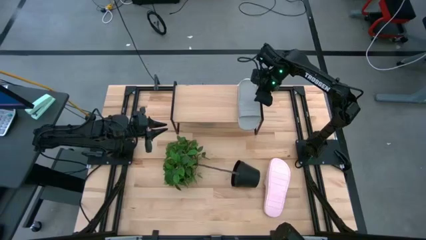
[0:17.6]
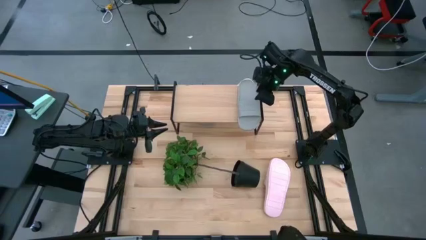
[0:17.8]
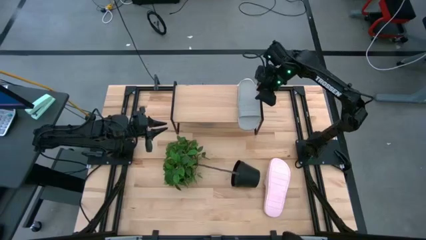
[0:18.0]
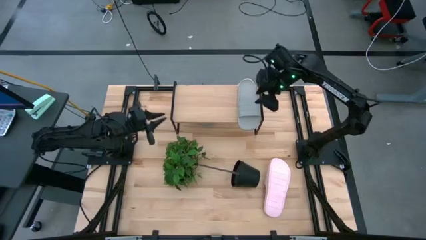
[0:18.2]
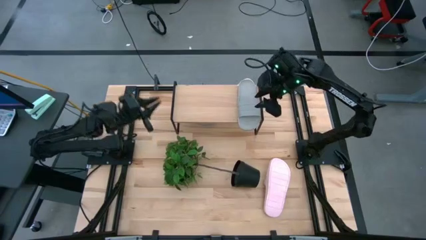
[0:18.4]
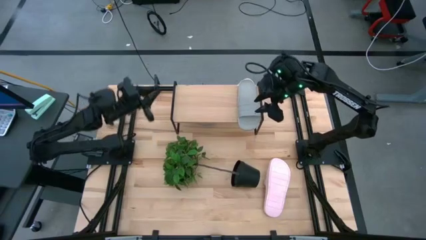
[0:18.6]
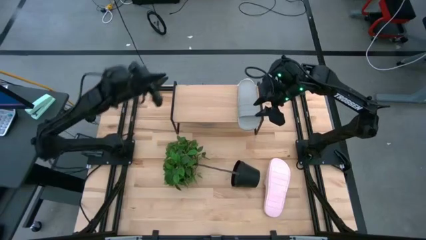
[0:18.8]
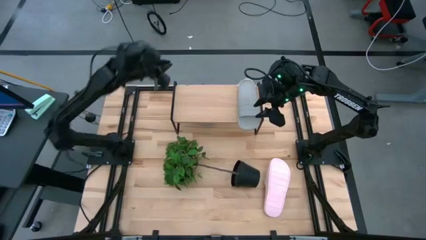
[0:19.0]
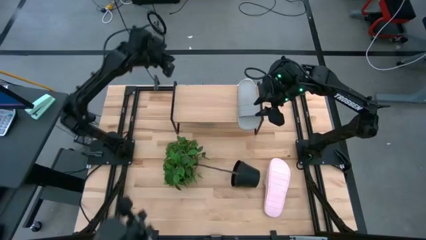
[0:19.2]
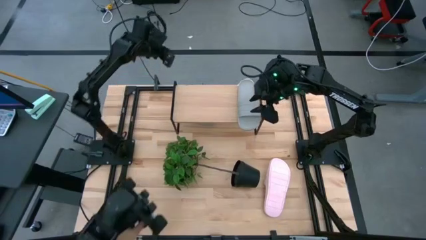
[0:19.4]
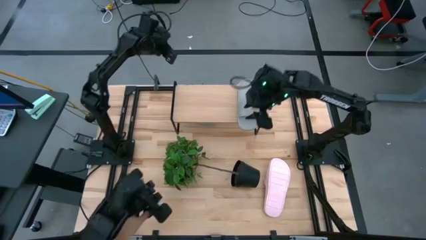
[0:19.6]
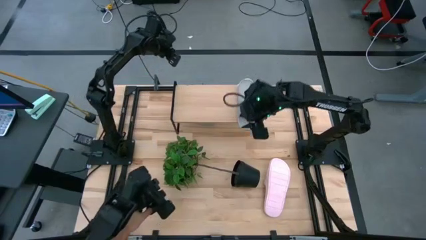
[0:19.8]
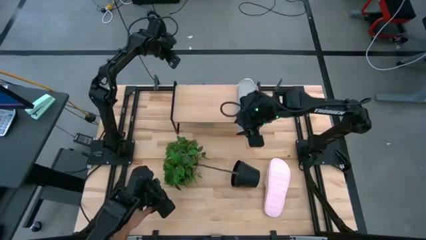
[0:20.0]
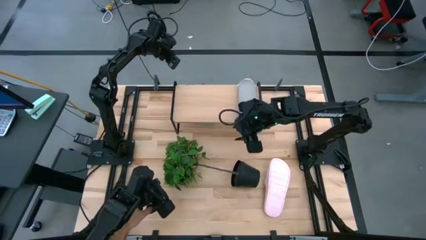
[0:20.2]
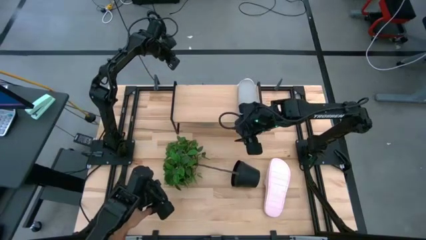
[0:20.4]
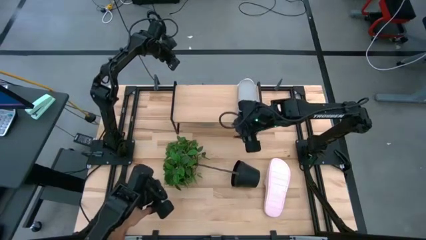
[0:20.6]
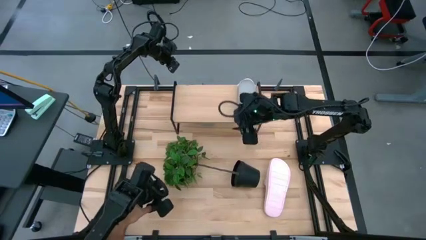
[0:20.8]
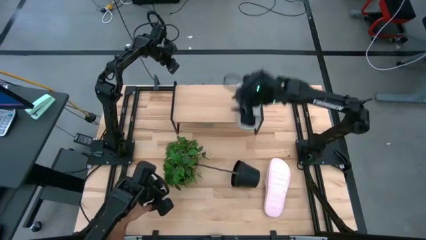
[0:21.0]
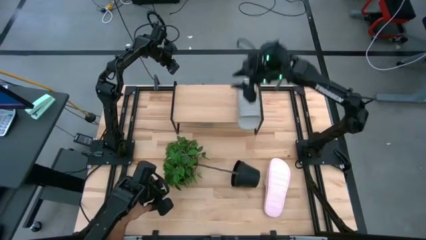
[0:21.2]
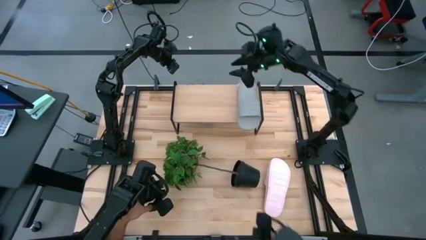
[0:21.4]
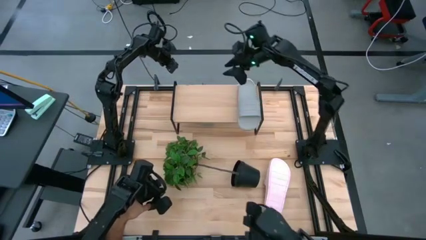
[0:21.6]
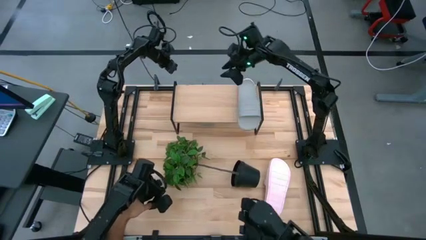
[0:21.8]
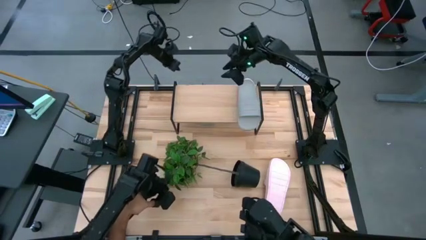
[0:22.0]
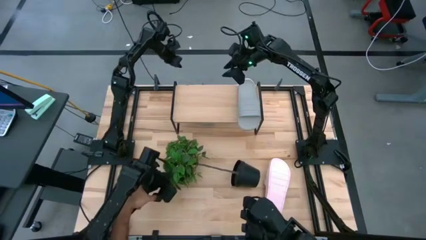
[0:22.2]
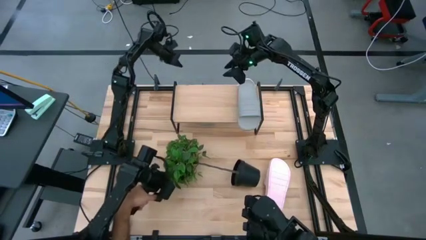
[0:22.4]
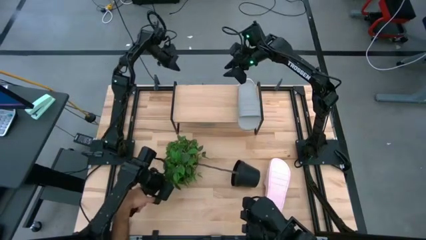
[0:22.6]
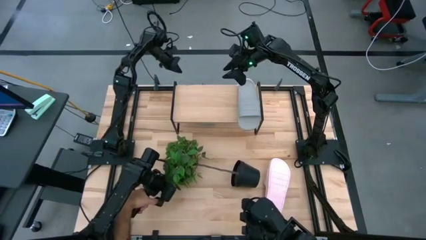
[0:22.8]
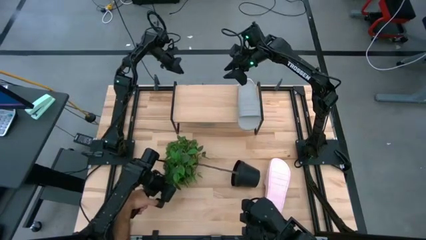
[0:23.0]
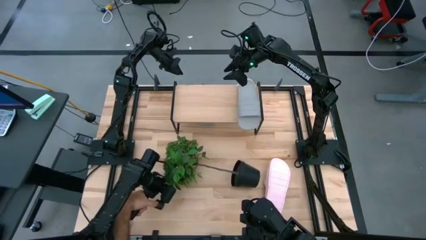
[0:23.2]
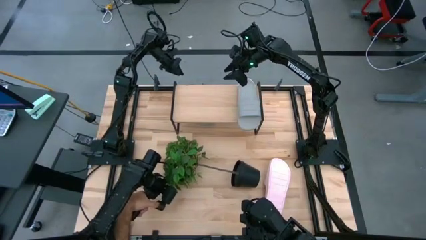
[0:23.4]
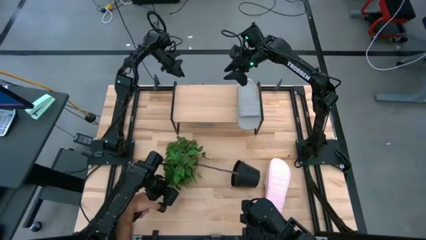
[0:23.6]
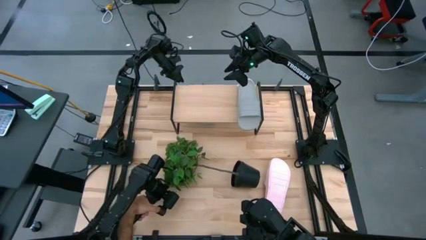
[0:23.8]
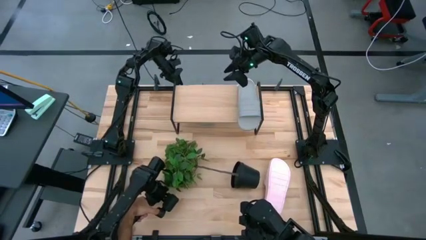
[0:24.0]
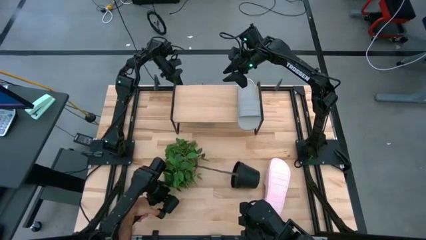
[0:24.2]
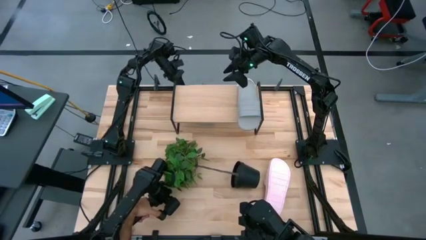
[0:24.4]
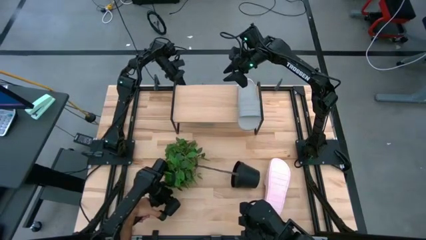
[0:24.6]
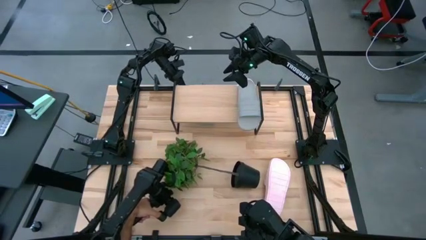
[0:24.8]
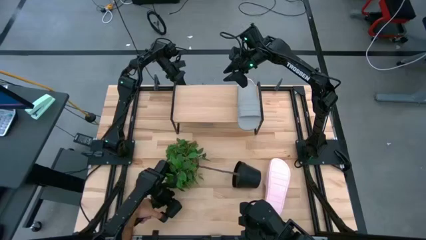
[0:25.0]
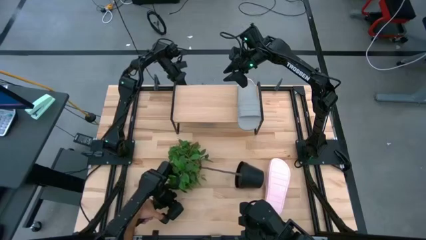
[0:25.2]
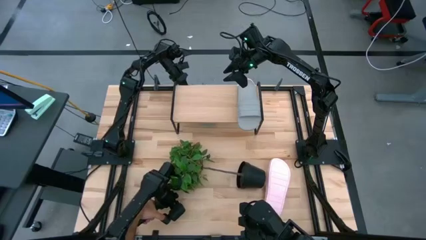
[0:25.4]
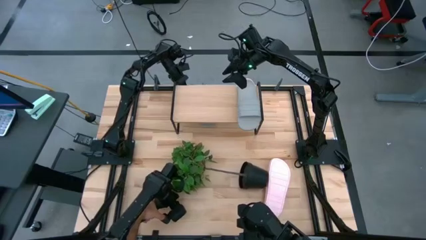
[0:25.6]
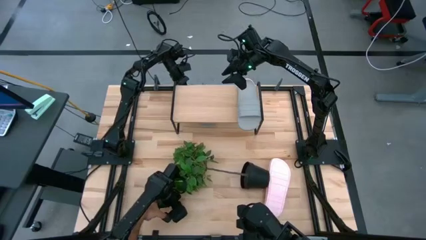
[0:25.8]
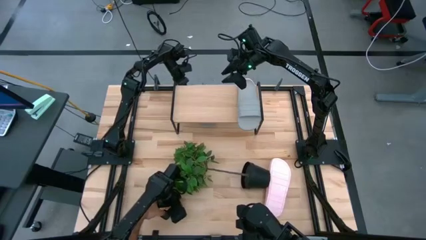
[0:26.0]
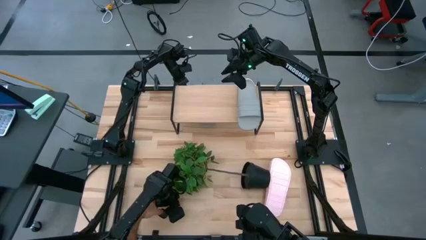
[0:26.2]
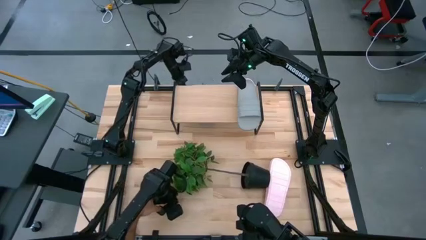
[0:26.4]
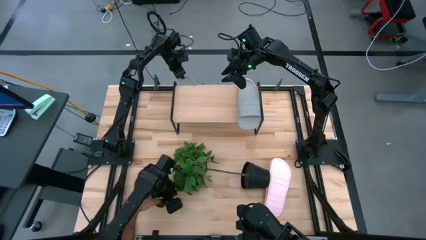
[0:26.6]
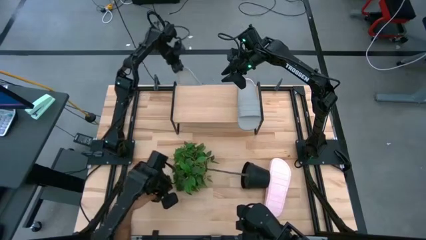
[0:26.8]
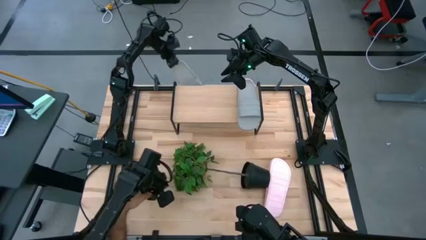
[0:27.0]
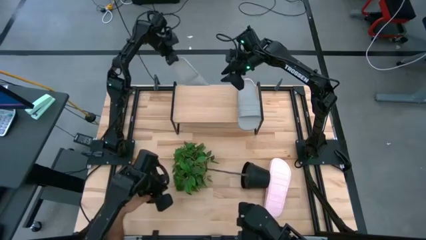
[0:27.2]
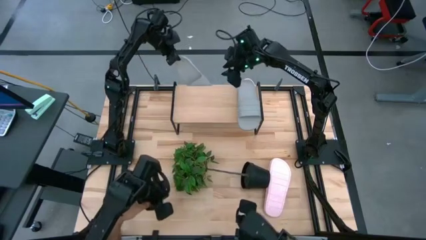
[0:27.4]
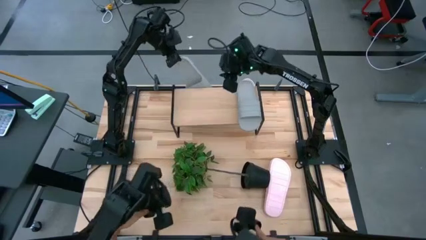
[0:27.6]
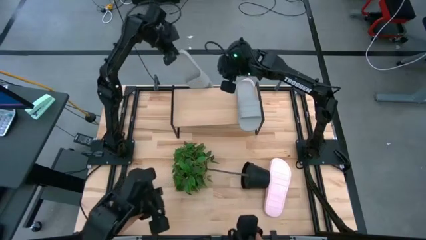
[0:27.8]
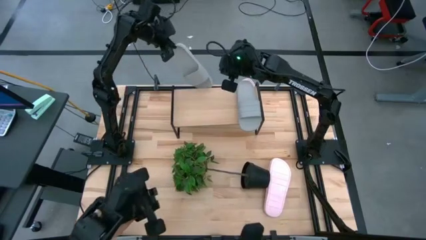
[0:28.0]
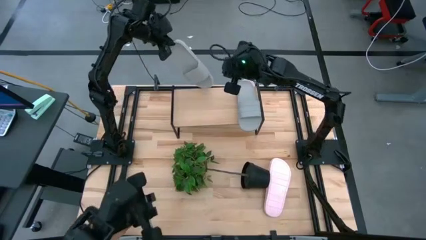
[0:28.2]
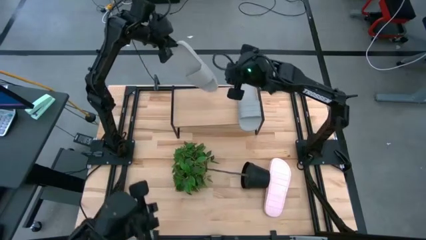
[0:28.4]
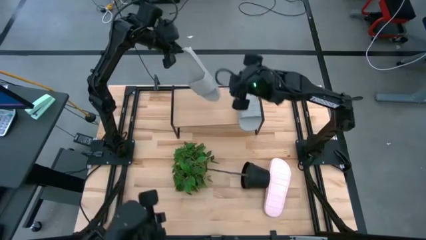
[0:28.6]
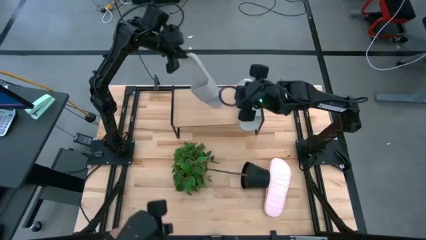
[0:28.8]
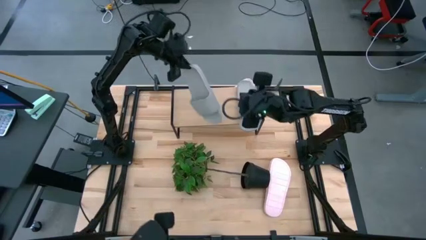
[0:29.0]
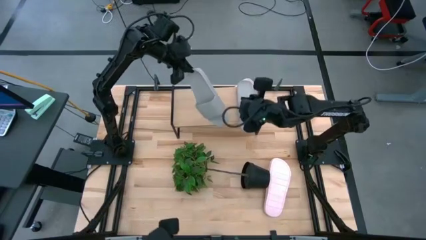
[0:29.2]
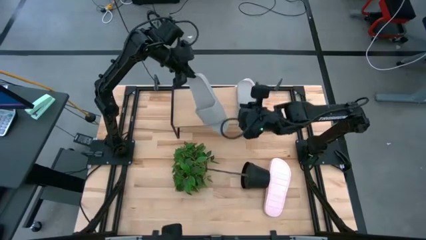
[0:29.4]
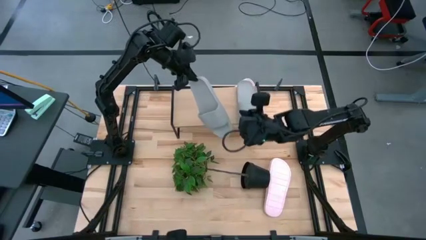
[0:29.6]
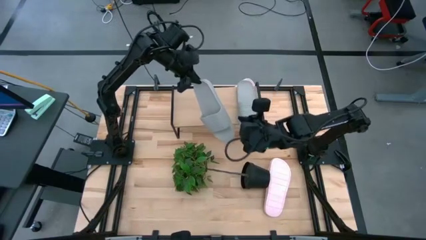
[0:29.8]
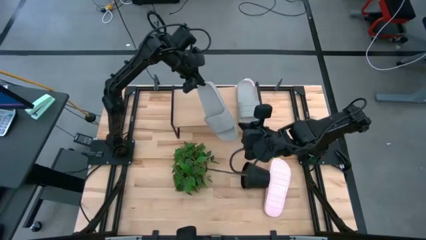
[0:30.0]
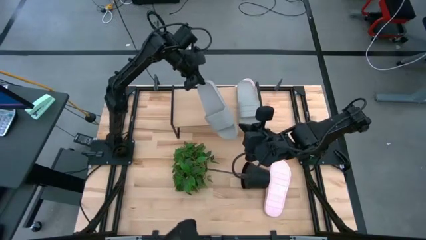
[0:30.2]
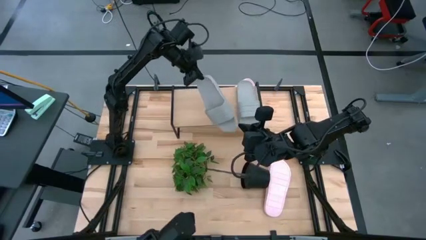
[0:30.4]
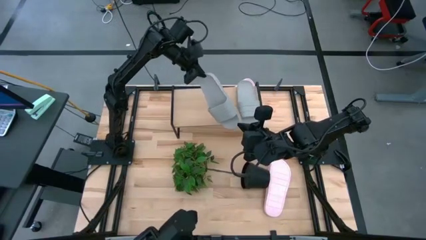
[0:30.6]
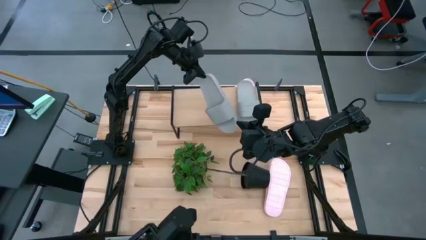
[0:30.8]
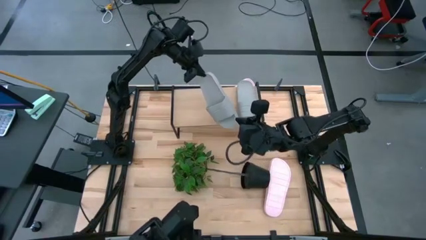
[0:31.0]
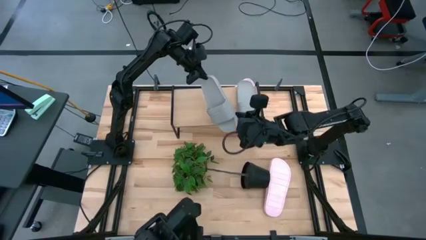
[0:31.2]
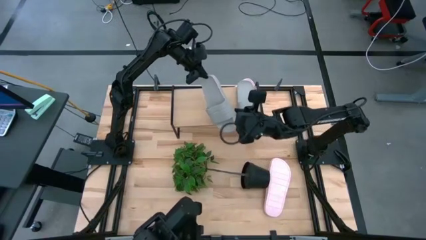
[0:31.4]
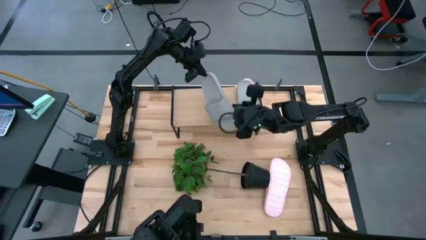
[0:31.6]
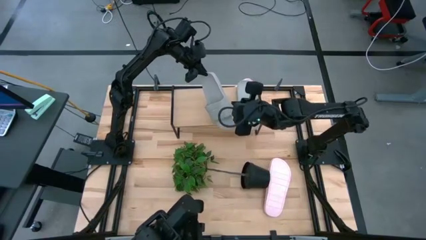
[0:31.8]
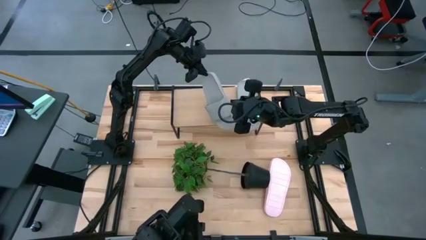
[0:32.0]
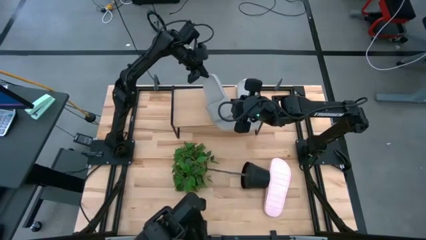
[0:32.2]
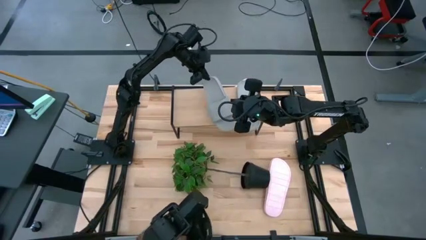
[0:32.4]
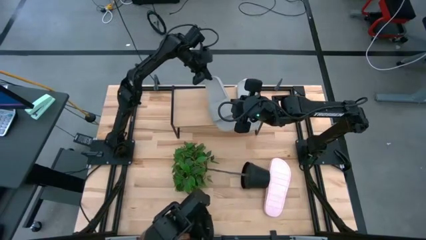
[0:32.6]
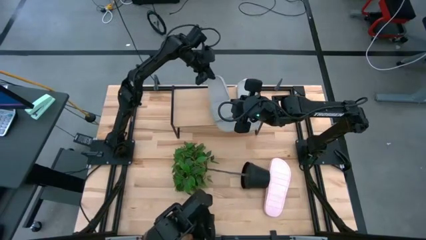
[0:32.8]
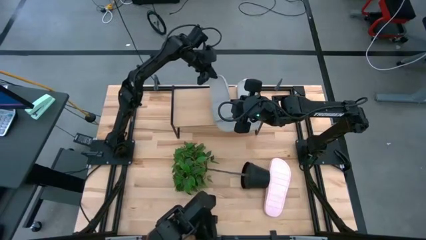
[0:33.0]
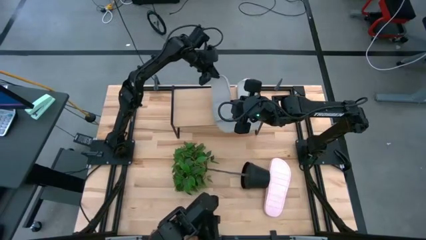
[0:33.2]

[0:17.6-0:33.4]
Task: Pick and place slides into the shelf
Put the gray slide on the shelf
